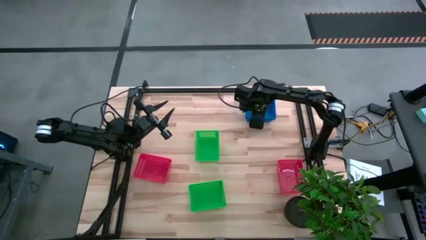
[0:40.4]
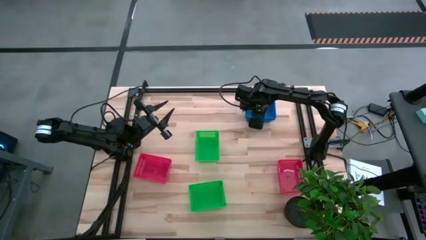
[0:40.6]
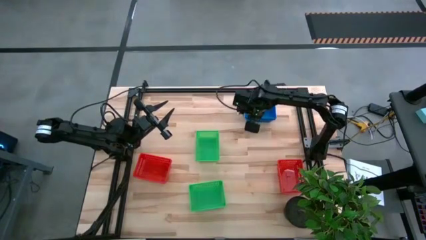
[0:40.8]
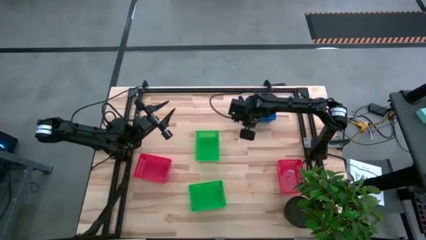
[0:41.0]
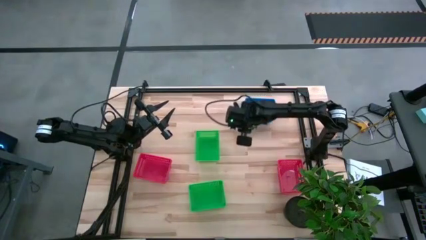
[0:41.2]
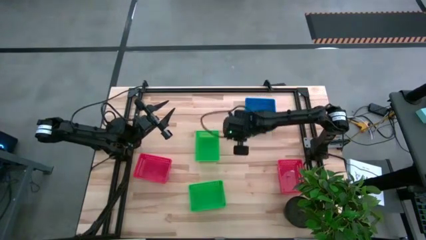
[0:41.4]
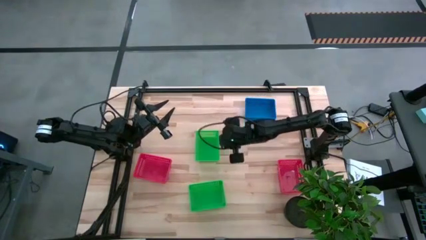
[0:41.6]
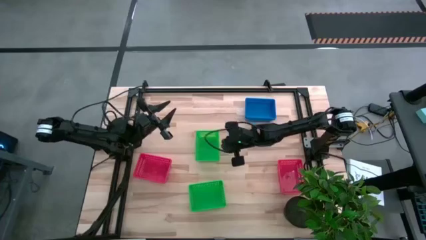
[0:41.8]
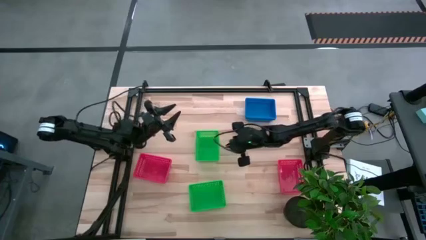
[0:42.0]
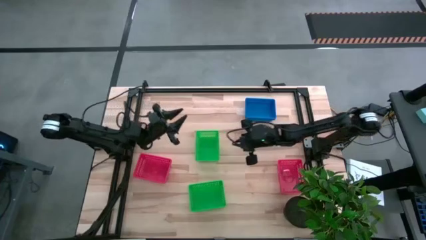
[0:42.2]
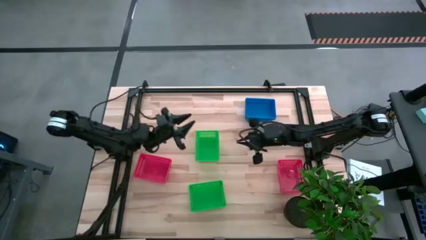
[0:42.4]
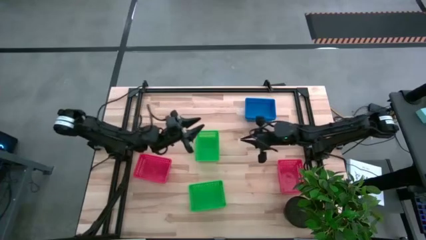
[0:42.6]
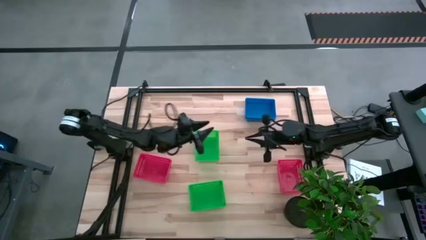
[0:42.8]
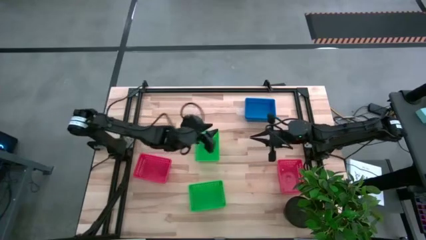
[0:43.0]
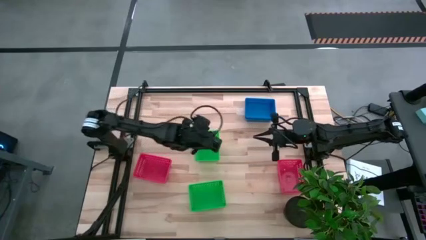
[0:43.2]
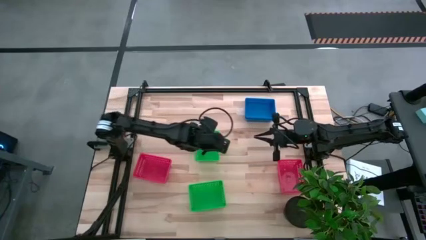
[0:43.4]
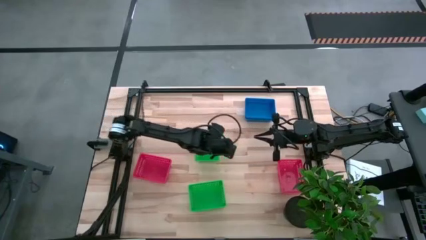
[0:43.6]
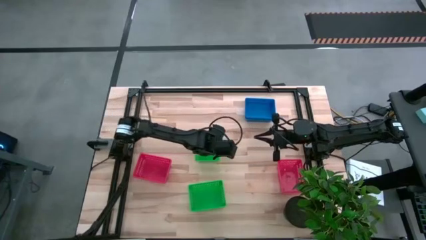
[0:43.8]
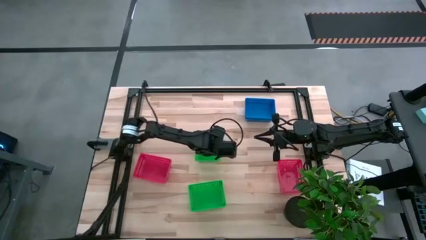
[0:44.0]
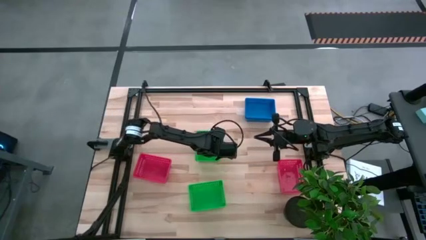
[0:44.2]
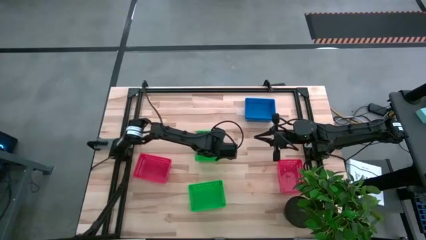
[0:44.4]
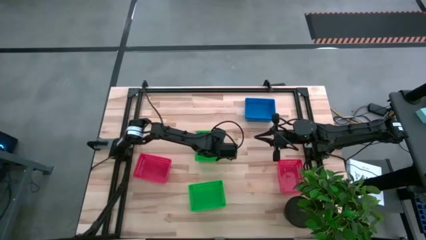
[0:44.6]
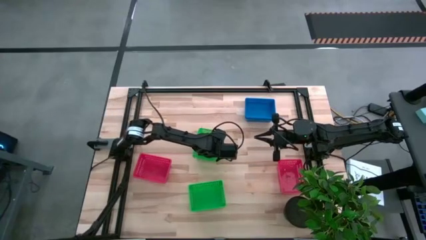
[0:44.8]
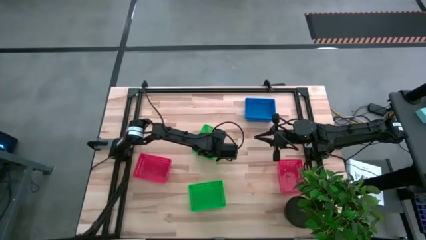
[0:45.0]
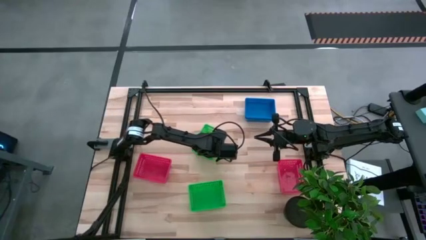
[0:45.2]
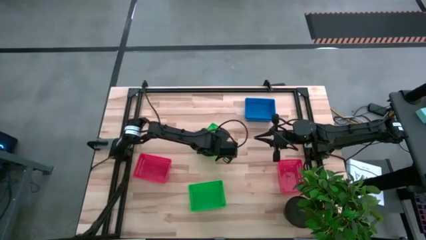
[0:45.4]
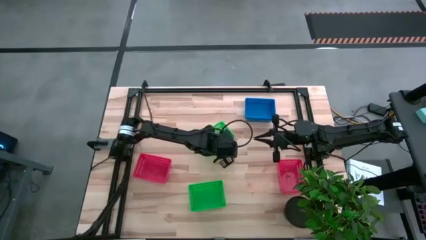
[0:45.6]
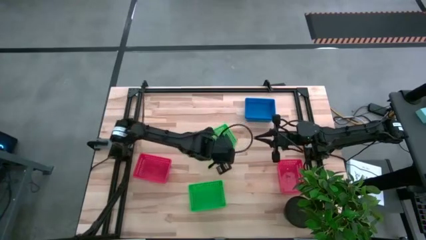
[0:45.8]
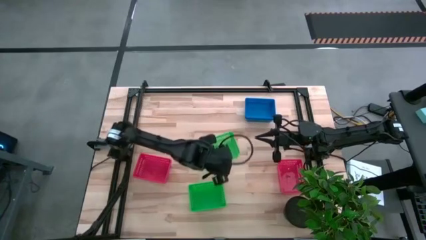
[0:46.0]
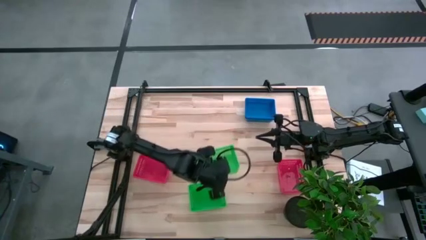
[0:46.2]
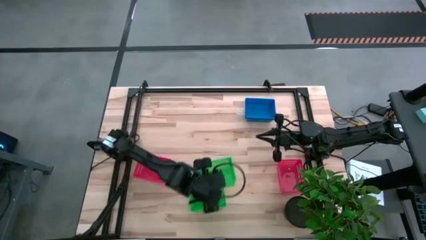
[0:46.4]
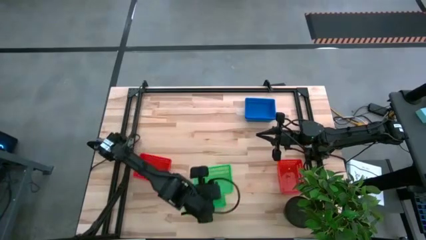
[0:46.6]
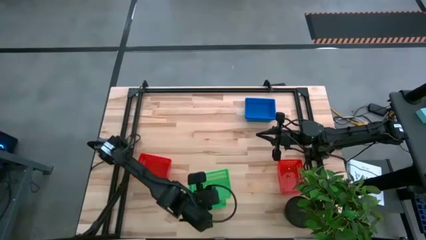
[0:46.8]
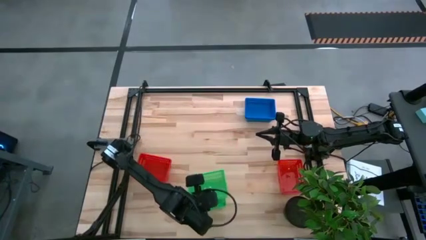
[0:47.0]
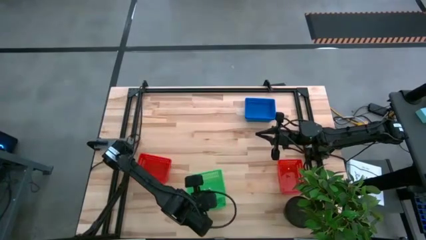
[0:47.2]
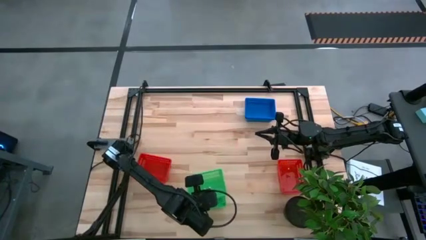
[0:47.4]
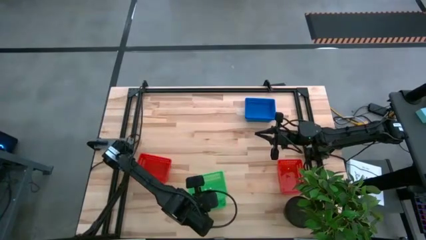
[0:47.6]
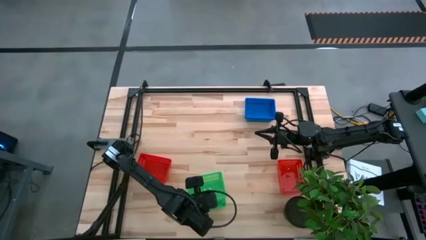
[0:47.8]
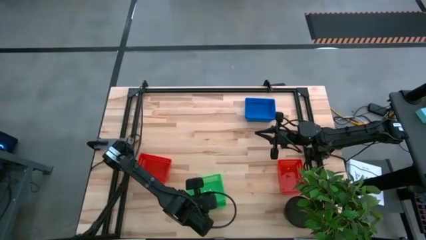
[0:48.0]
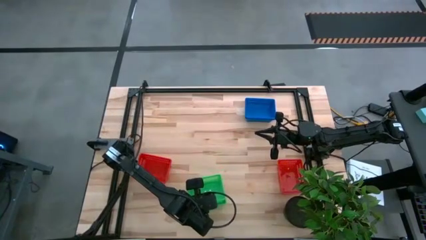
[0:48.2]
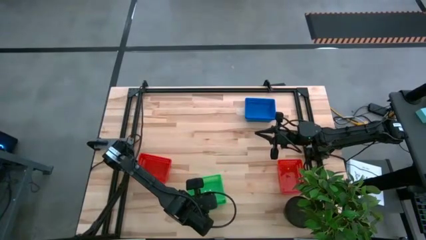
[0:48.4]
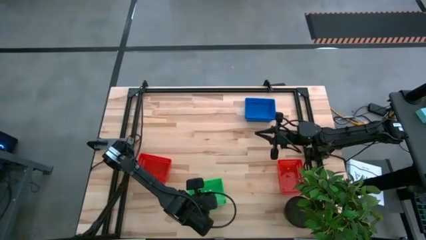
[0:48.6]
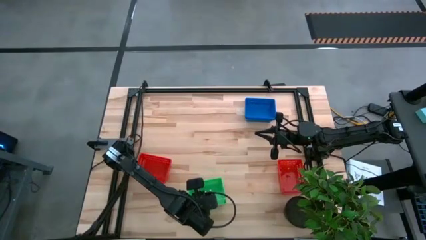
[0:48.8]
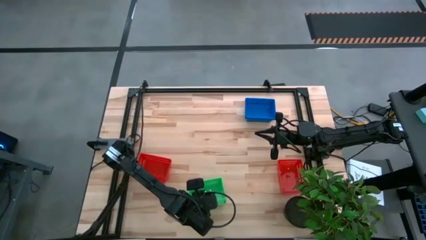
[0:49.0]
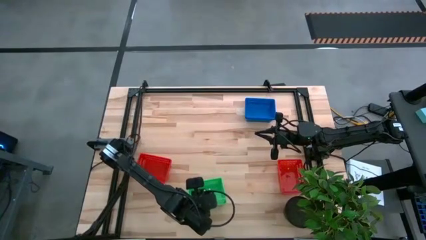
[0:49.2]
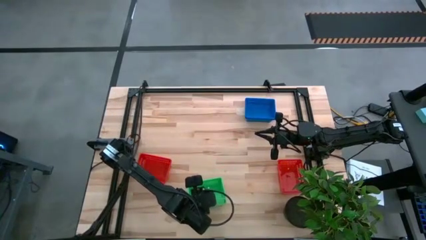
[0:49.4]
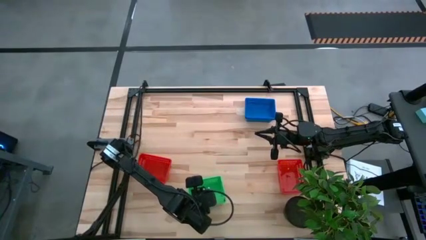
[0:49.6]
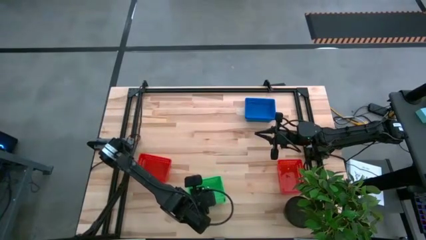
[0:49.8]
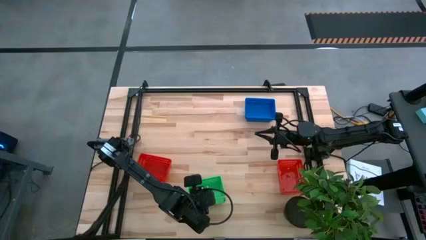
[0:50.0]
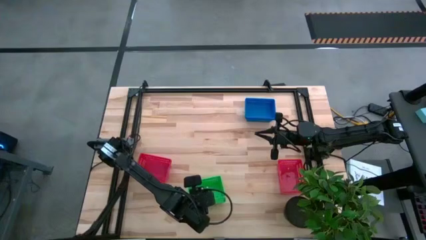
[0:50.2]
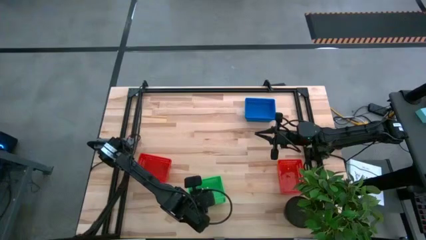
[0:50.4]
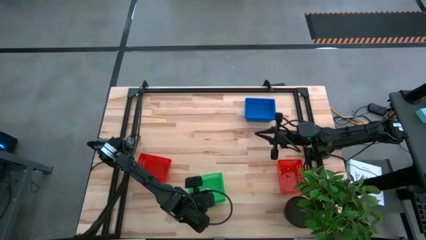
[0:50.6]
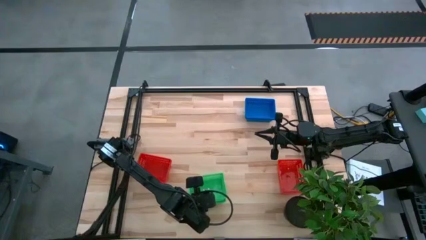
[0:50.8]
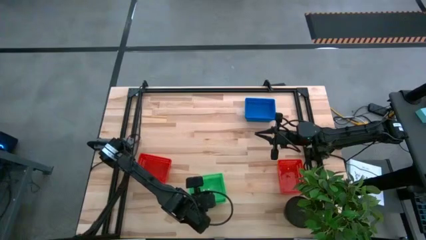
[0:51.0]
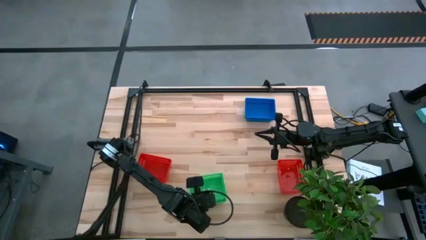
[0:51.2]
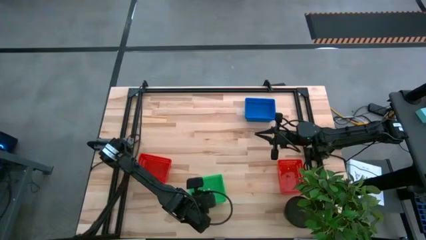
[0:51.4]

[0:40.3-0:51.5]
Stack the top green bin on top of the stacked green bins

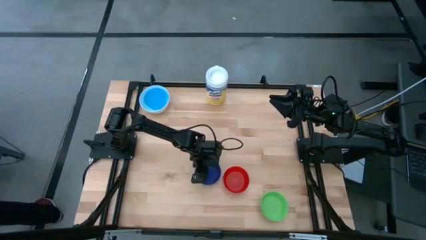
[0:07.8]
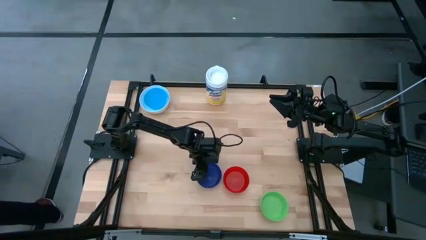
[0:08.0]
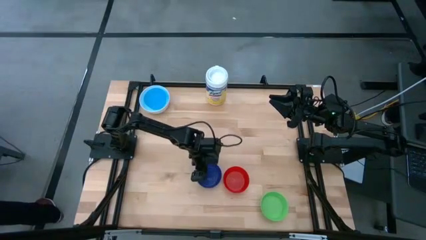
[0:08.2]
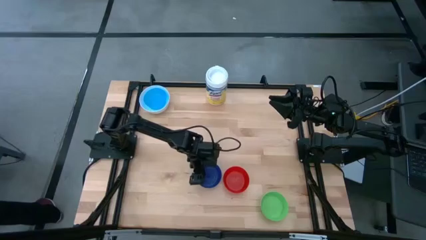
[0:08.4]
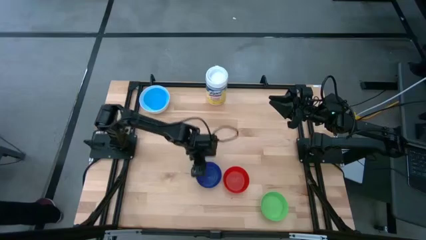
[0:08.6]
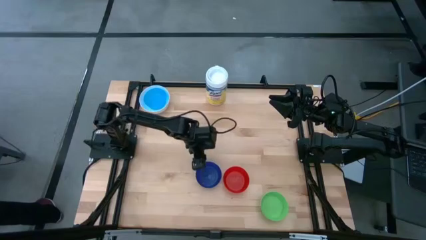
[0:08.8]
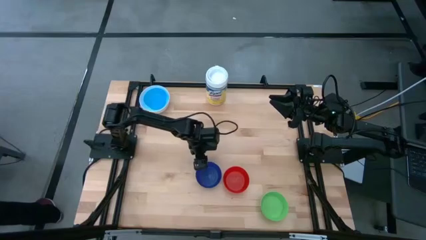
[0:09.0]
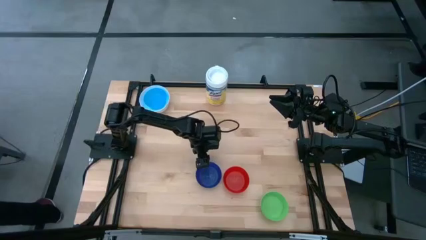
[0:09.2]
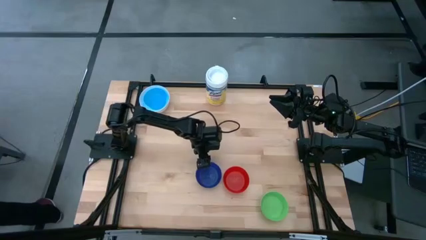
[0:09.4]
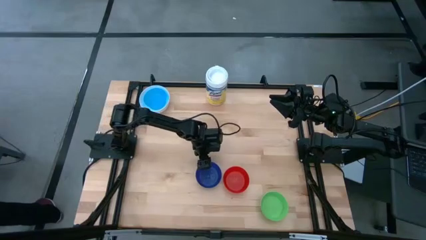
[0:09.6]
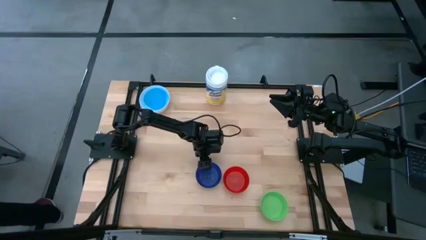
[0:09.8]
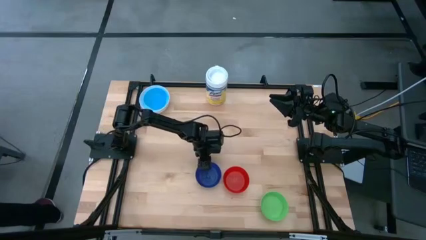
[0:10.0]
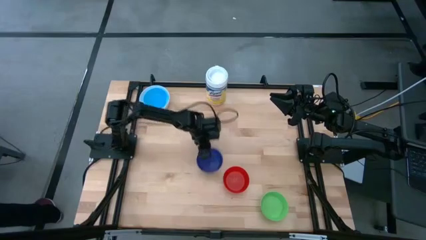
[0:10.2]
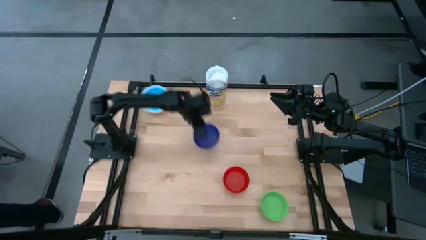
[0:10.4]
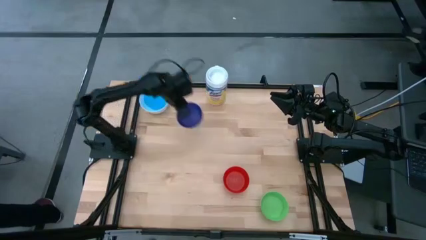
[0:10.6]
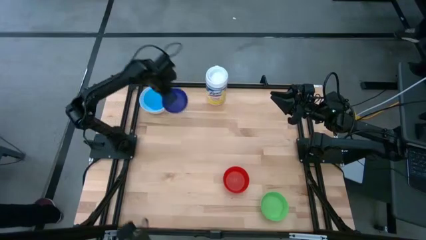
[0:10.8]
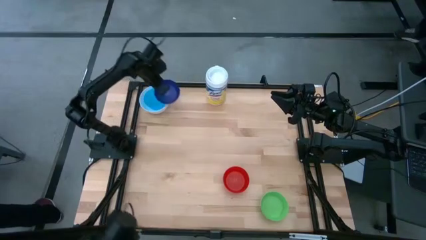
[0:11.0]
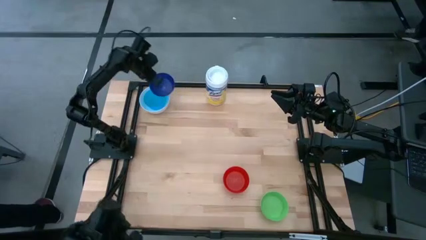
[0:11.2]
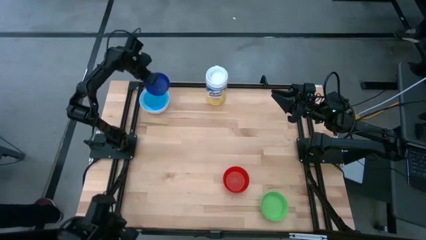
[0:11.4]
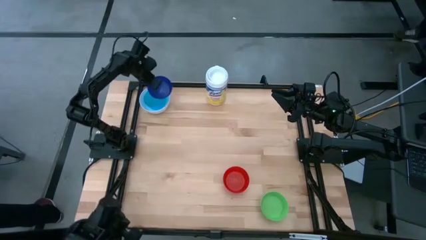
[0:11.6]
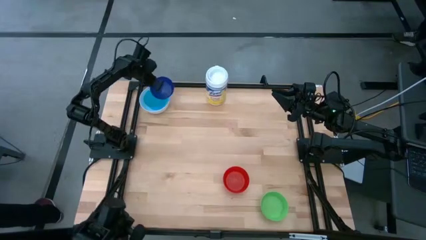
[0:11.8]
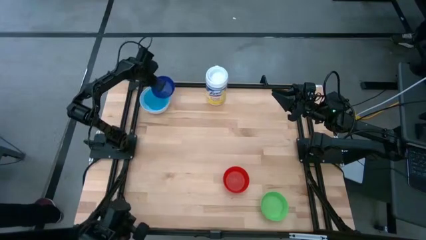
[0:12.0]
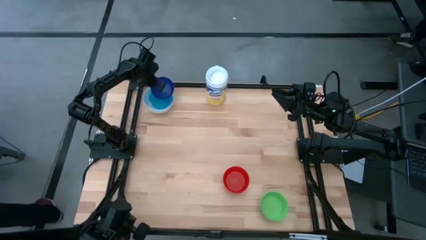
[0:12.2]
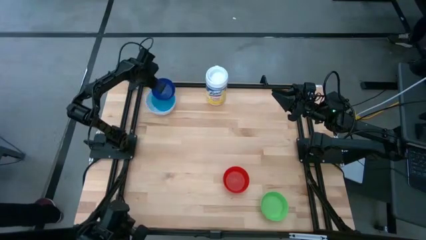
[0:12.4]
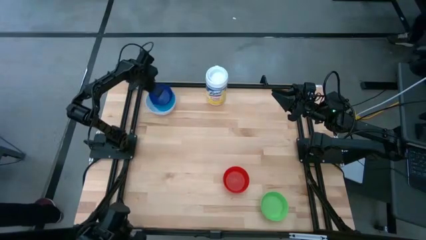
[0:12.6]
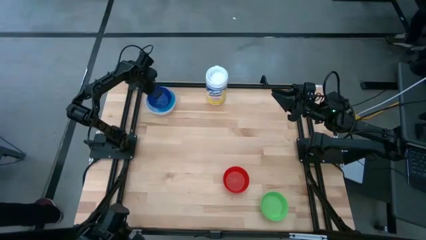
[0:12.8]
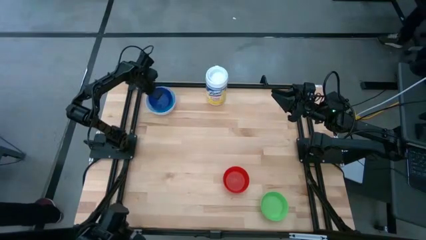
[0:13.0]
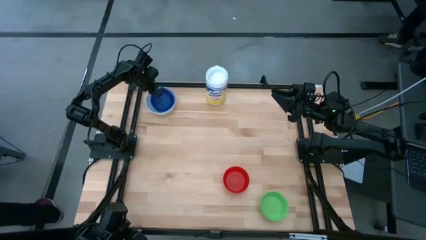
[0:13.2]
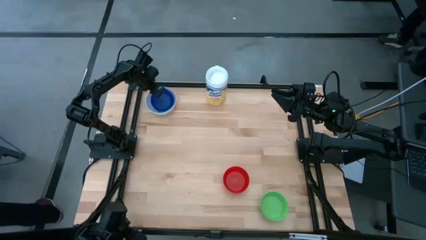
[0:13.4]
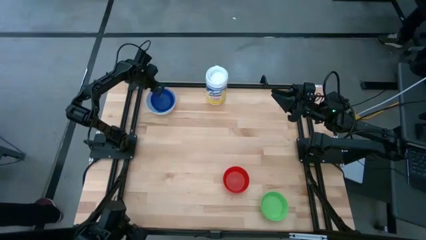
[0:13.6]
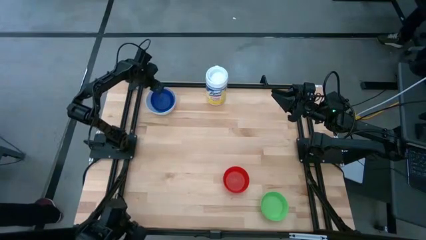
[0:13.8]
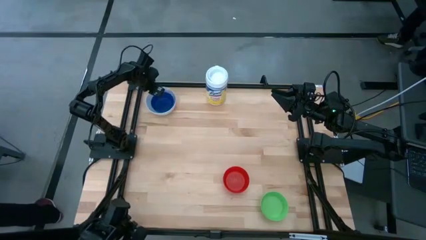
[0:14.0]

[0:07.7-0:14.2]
Stack the dark blue bowl on top of the light blue bowl
